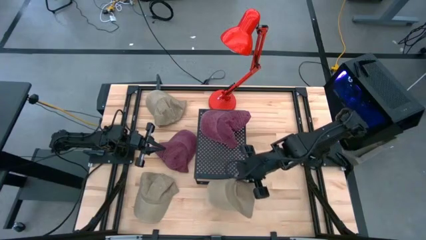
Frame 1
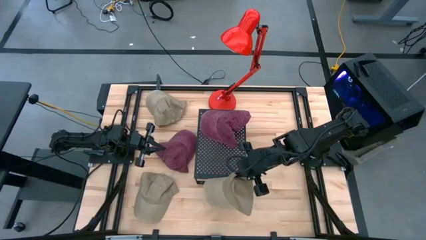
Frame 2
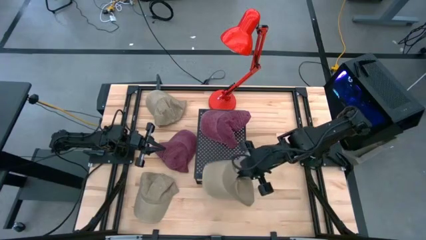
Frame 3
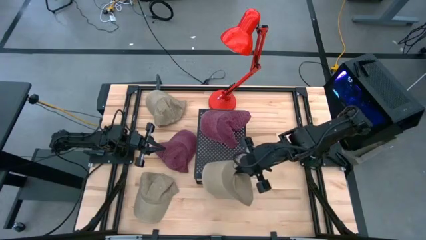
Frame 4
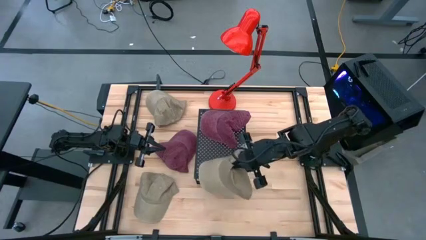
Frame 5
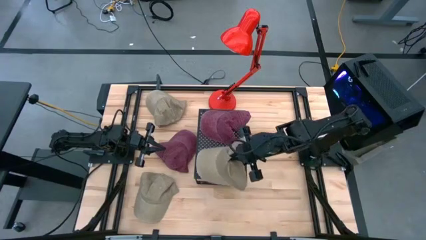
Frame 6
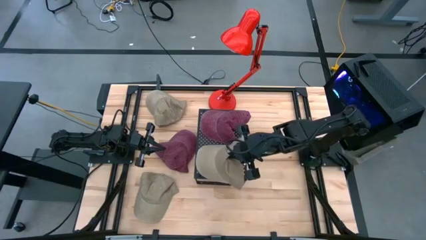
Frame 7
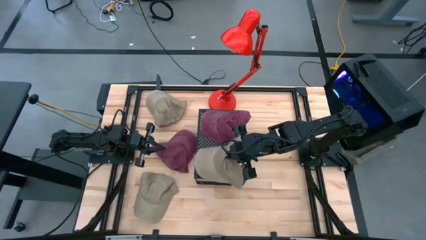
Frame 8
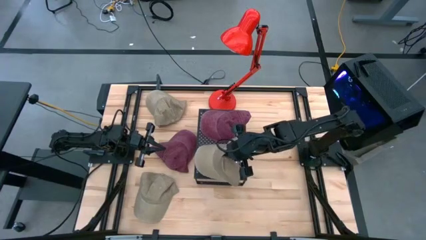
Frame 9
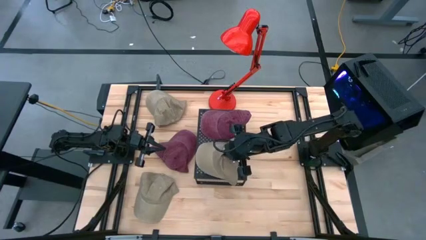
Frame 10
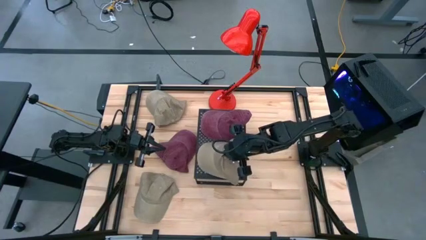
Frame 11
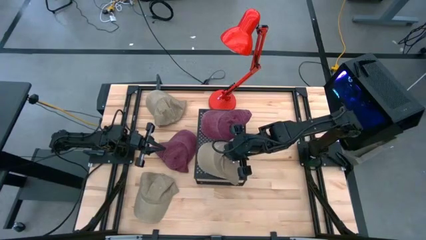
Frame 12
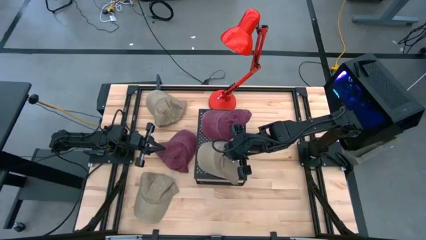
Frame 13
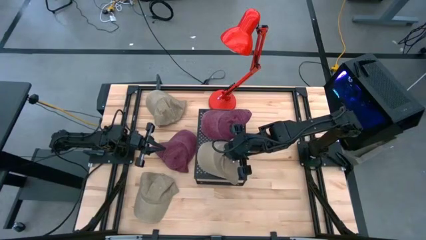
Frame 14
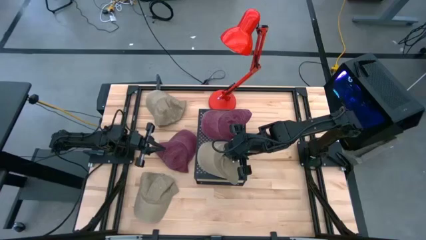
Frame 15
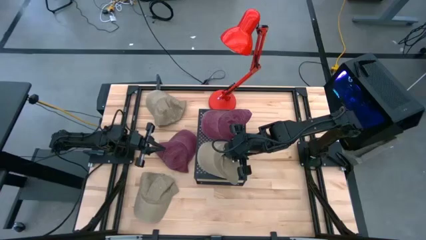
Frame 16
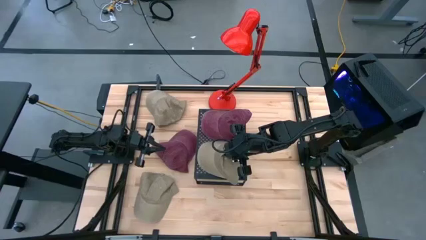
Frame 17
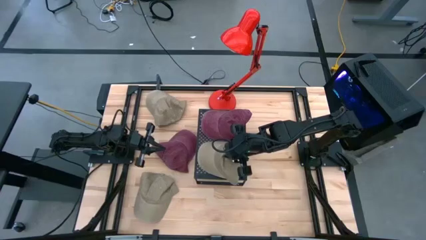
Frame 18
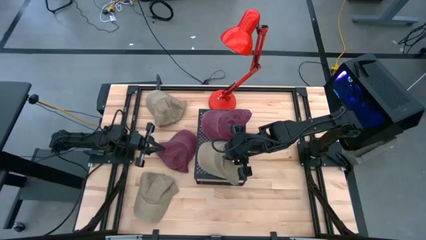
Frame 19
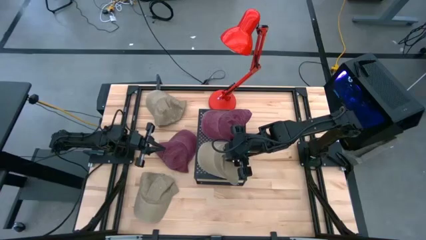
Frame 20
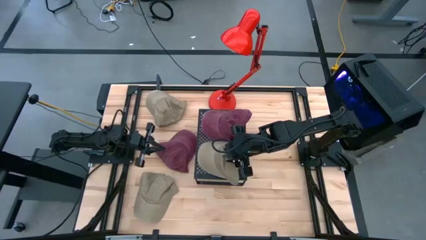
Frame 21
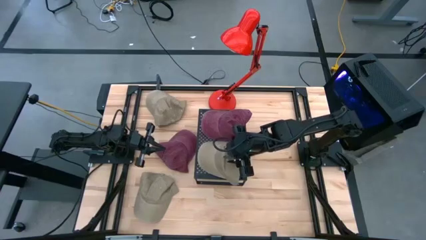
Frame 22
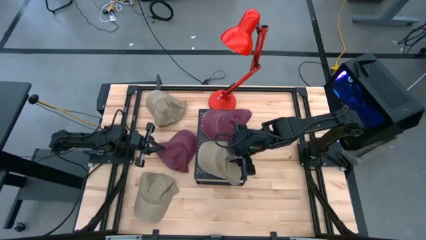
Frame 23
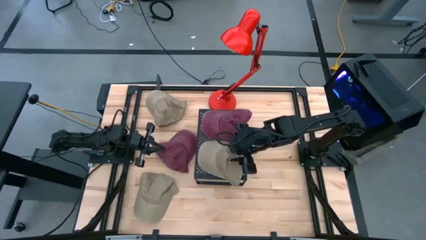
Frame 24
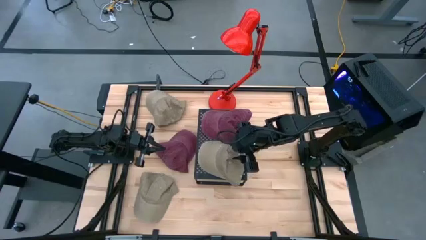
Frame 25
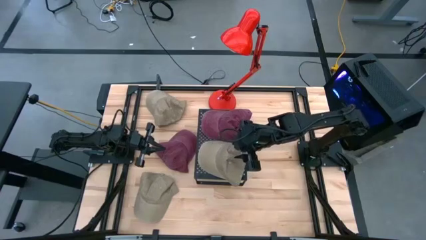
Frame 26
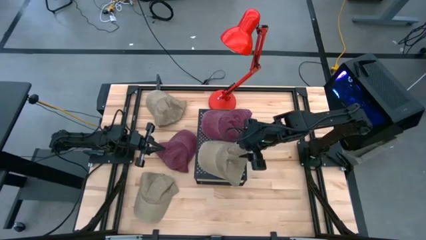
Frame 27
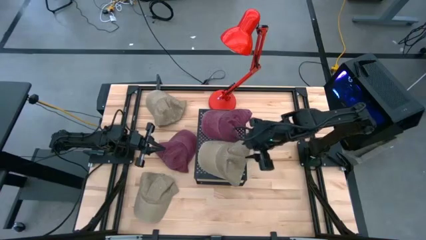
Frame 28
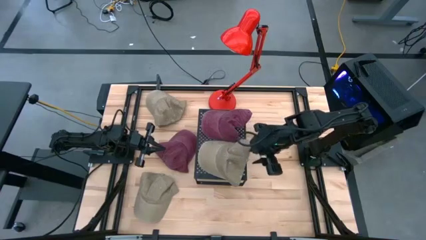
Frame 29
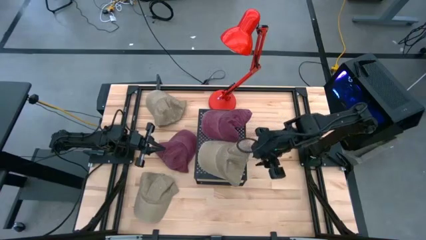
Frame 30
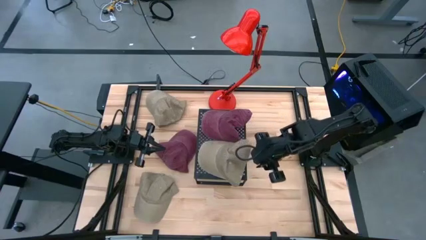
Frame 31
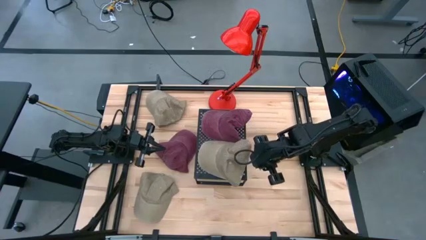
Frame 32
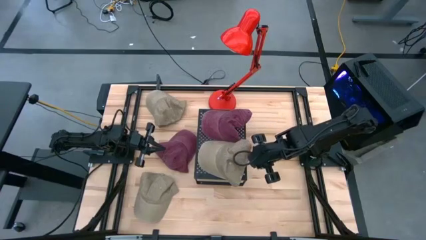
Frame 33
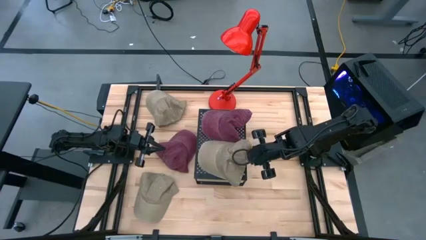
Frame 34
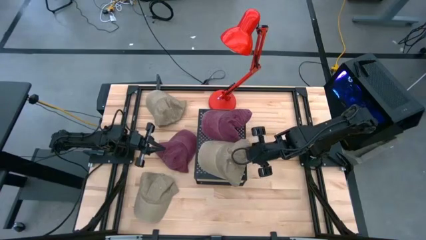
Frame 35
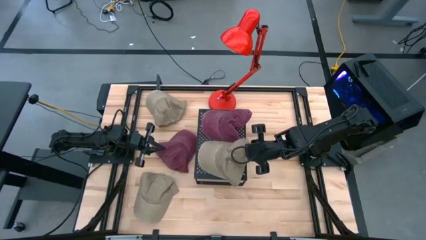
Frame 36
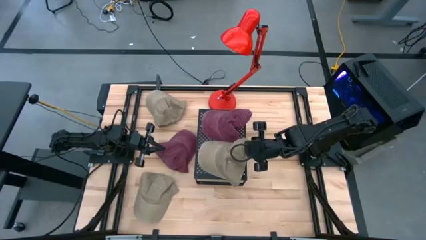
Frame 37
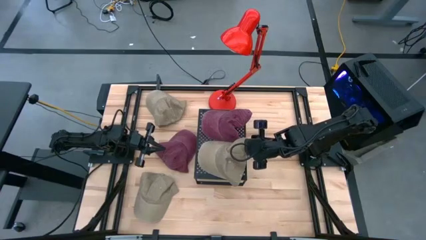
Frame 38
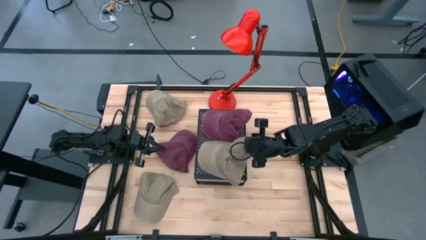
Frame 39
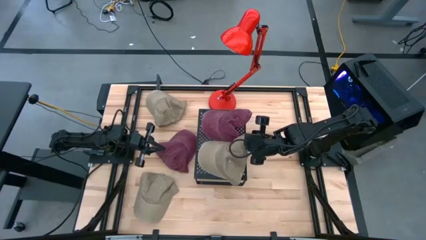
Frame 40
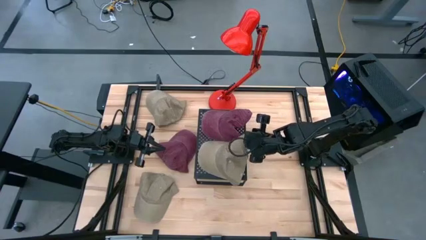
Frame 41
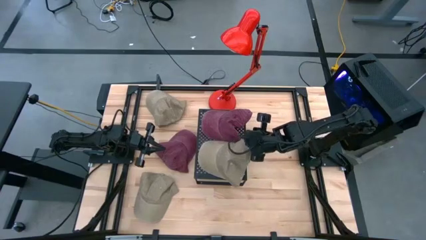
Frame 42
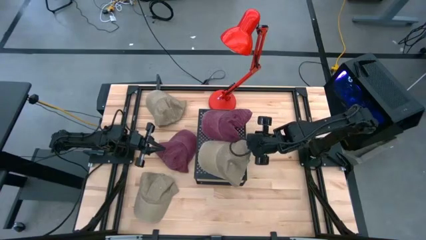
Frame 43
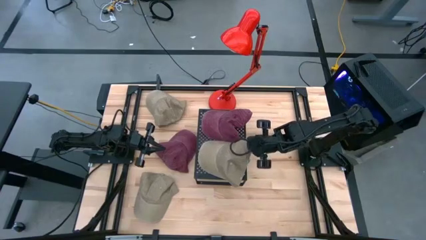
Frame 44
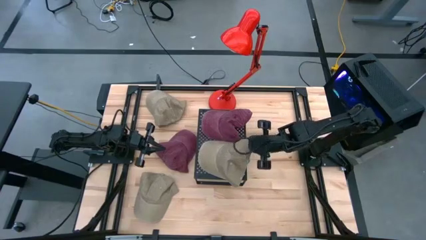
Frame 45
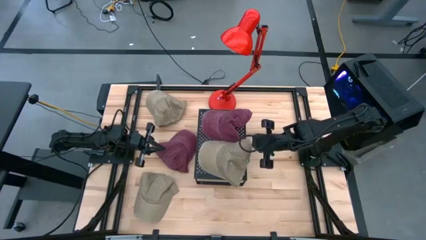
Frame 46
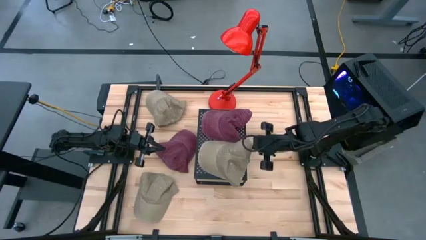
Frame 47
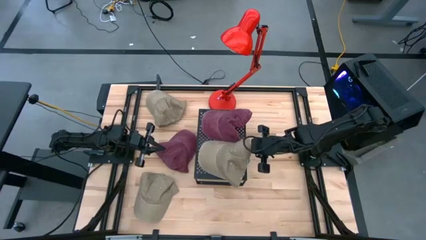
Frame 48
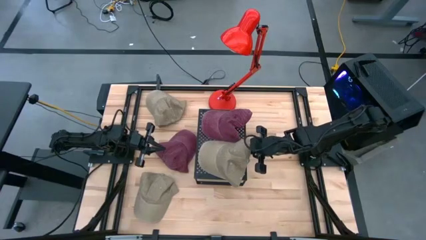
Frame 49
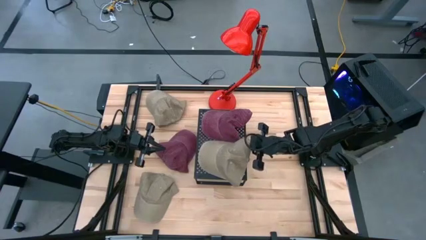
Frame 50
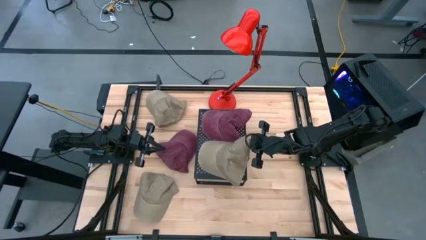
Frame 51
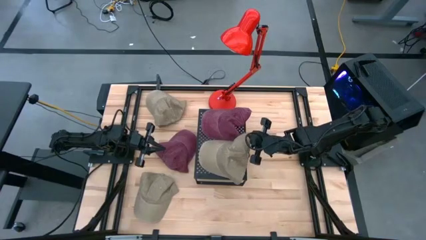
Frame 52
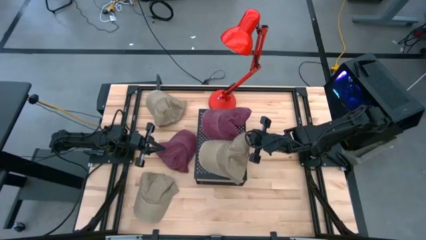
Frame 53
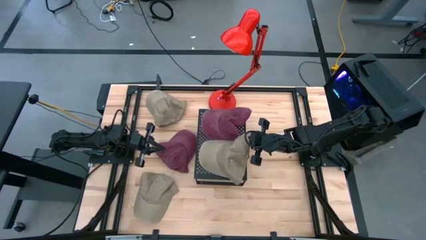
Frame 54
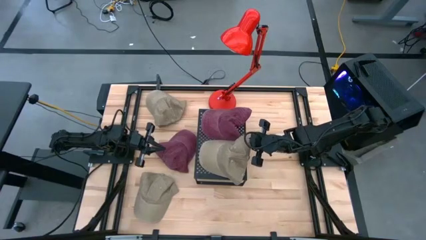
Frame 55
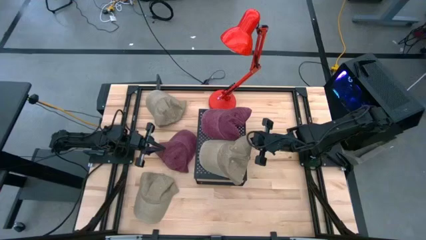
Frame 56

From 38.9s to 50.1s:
Task: Pick & Place hat
Put the bottom right brown cap on the shelf
